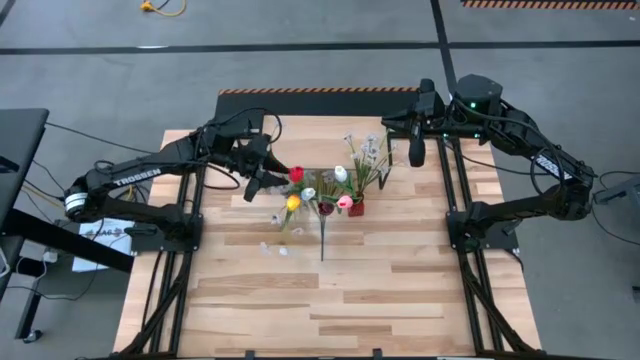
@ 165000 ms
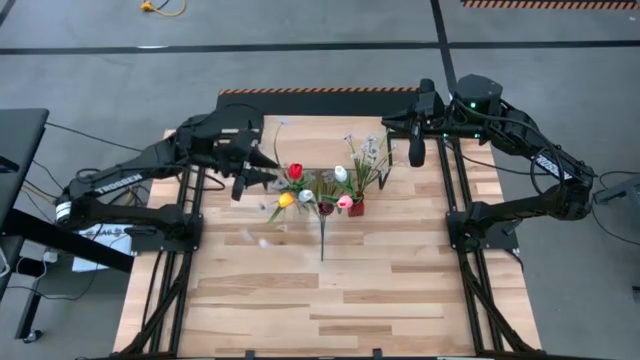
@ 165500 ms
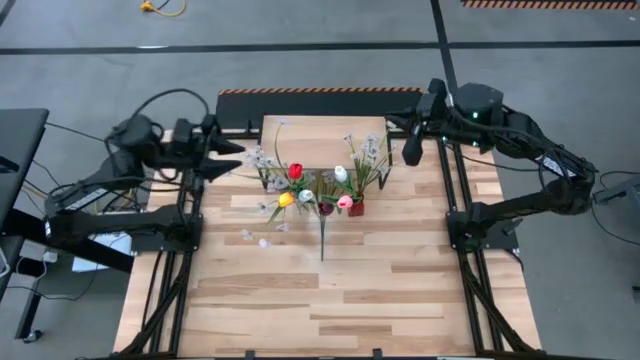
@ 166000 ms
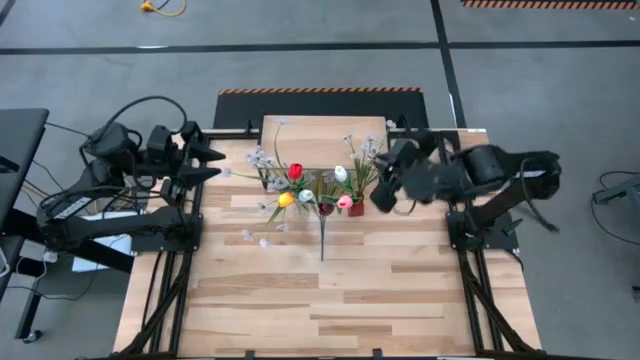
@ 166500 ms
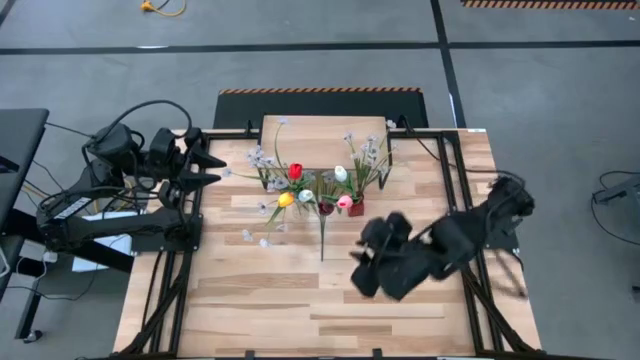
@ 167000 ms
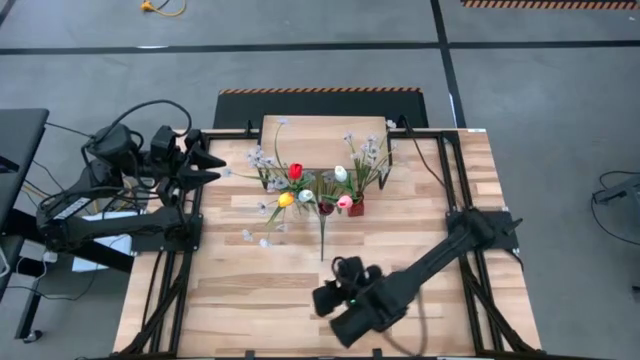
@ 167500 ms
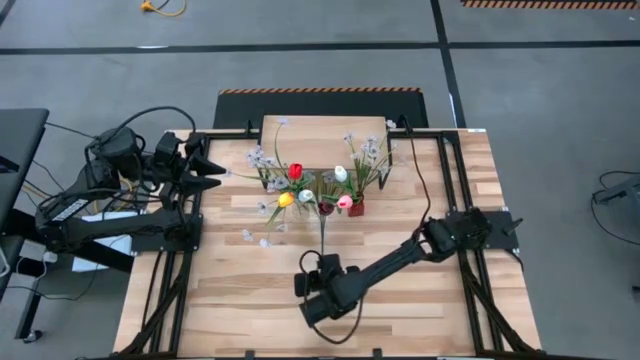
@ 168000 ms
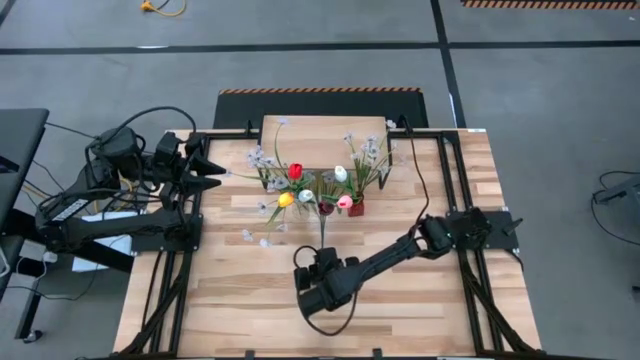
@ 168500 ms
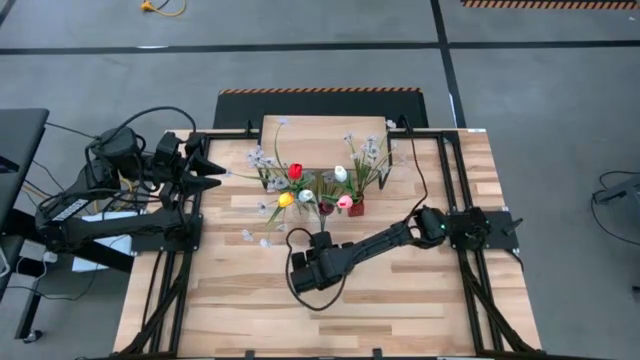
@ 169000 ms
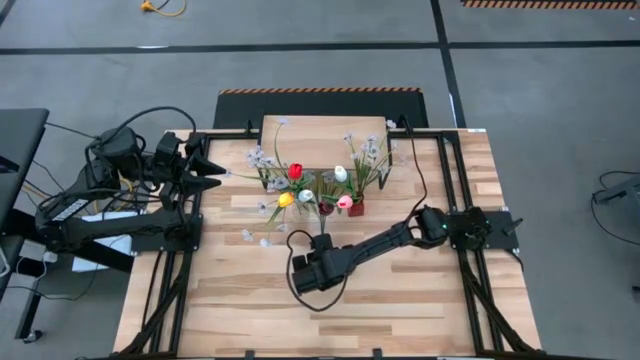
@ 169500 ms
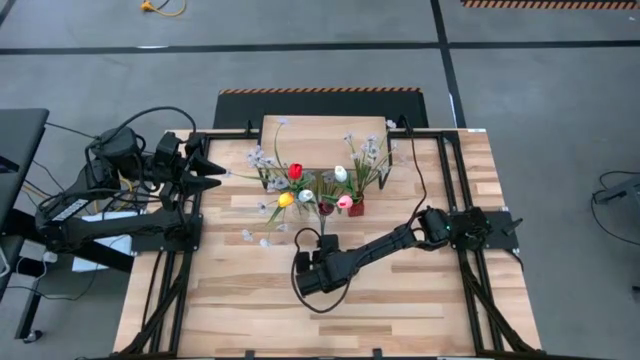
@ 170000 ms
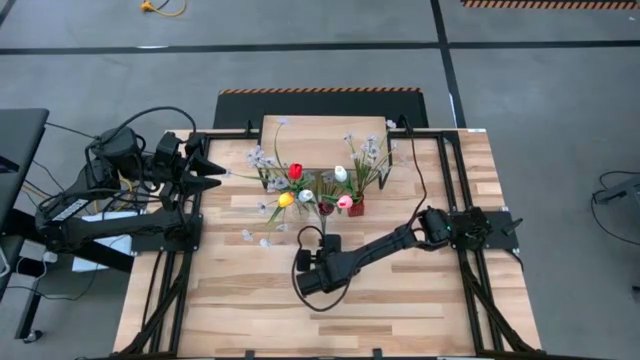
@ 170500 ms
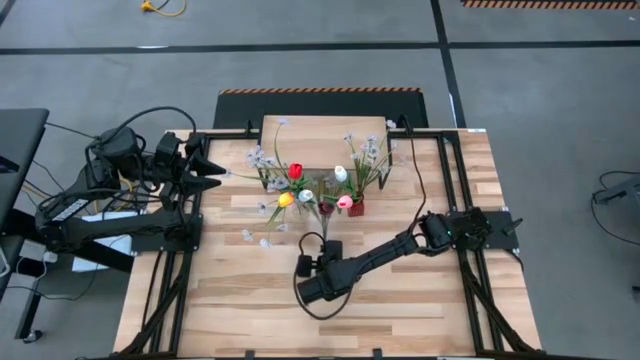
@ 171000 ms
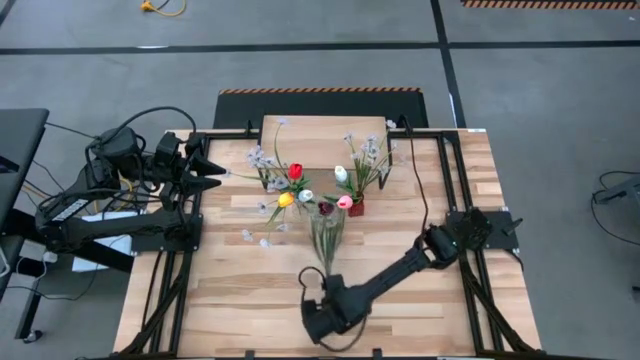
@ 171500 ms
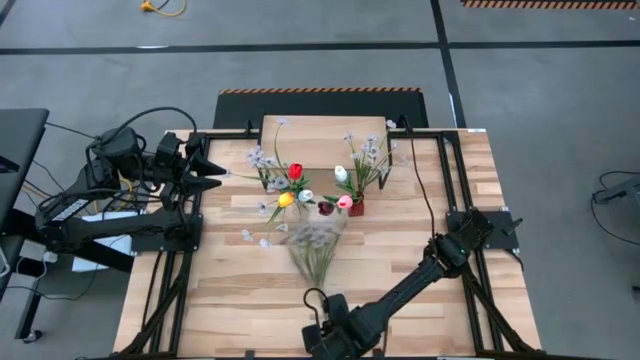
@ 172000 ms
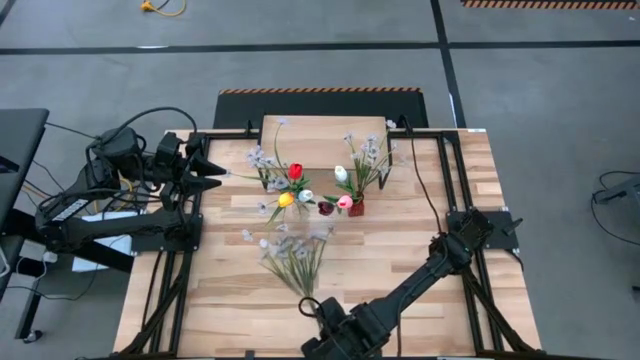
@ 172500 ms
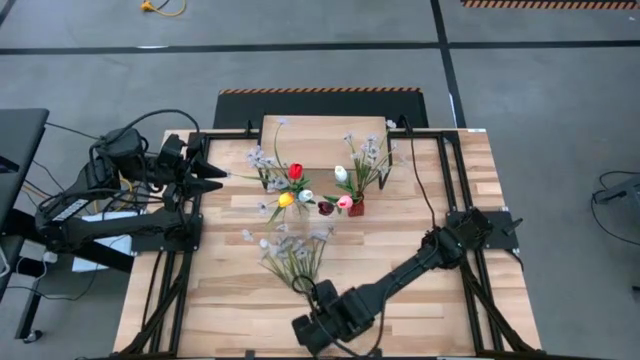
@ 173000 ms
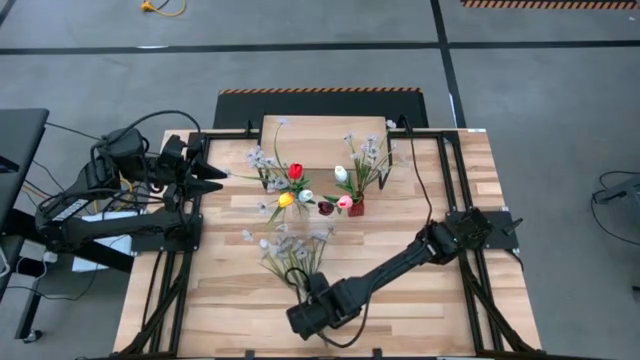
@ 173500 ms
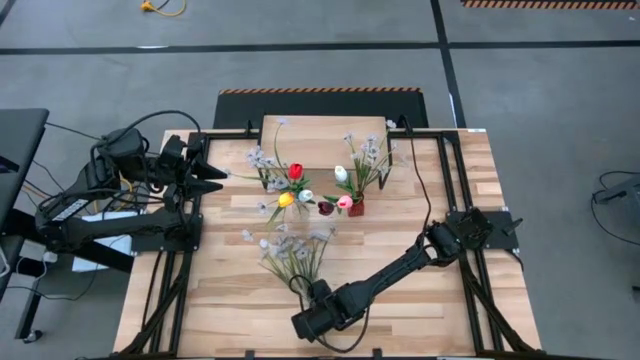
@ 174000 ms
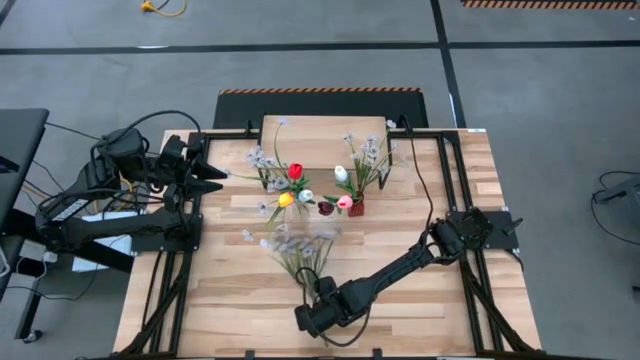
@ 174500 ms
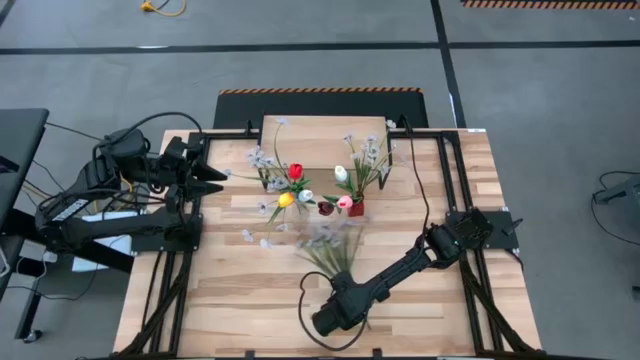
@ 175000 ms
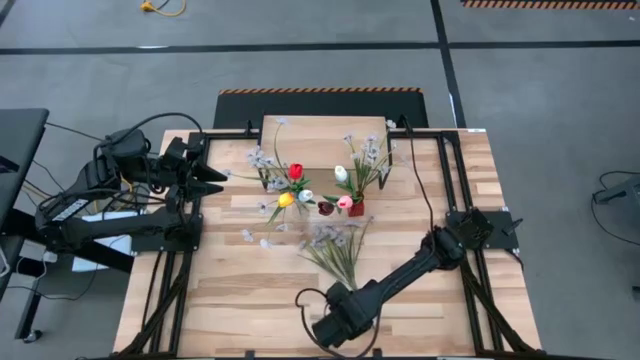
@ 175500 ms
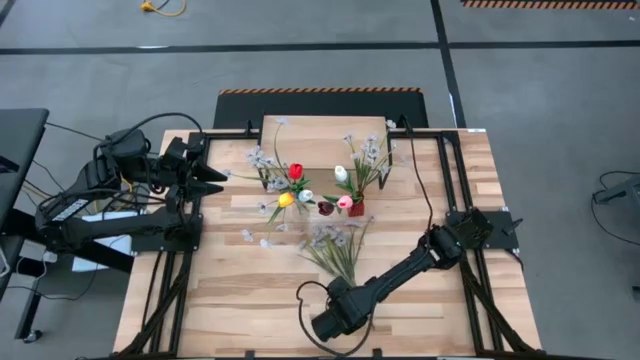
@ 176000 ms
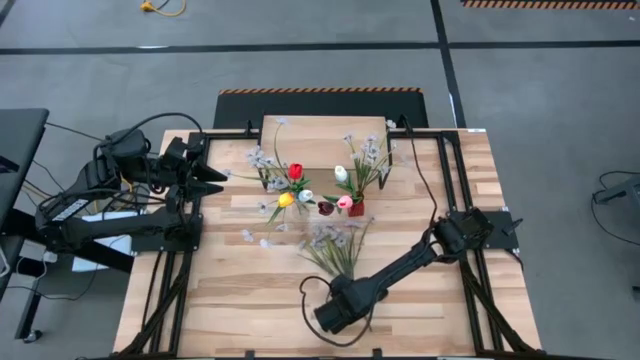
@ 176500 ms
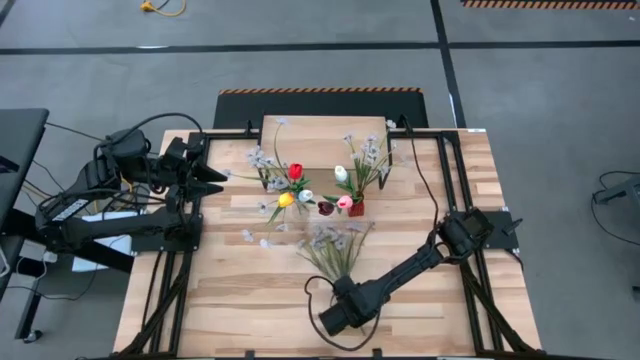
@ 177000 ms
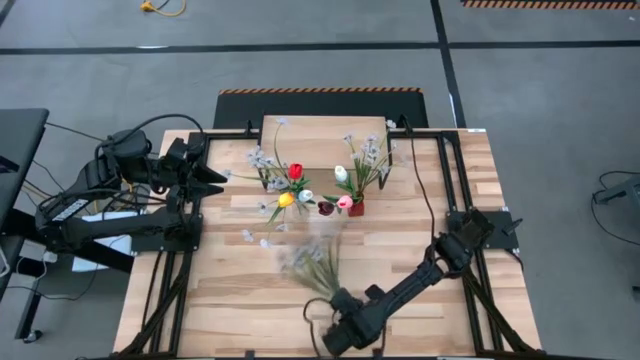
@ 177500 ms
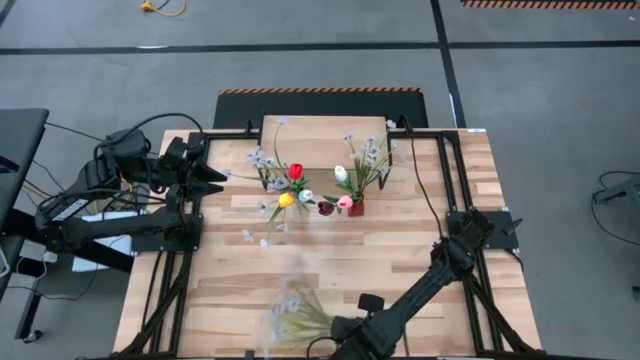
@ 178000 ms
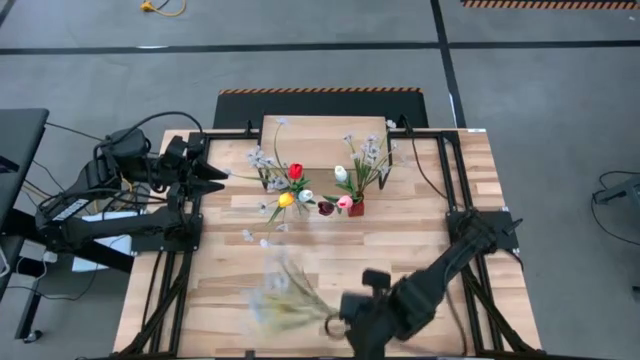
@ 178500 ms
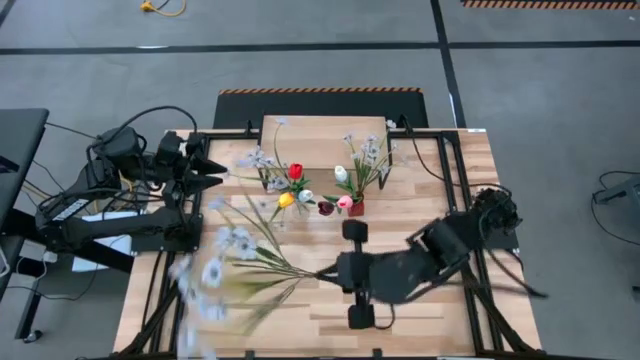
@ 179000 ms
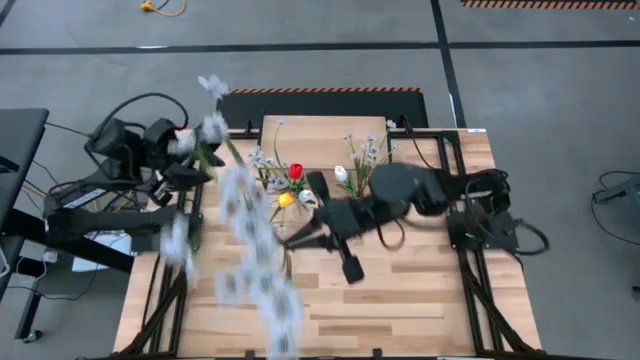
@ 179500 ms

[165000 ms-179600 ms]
Task: Pick and place flowers into a vace then onto a shelf
Put the white flower into the red vase

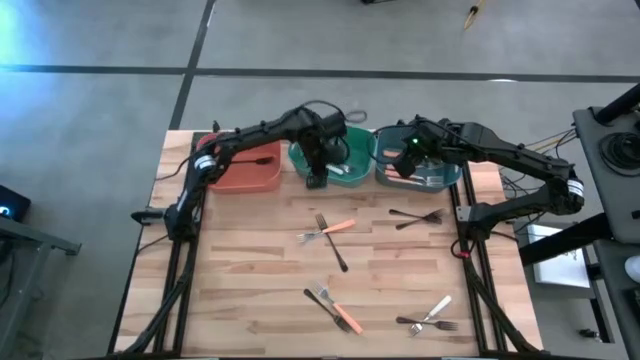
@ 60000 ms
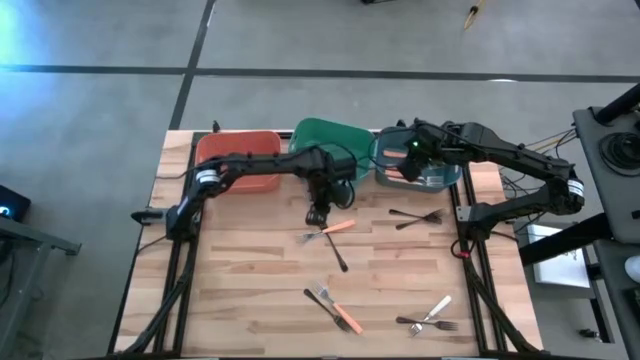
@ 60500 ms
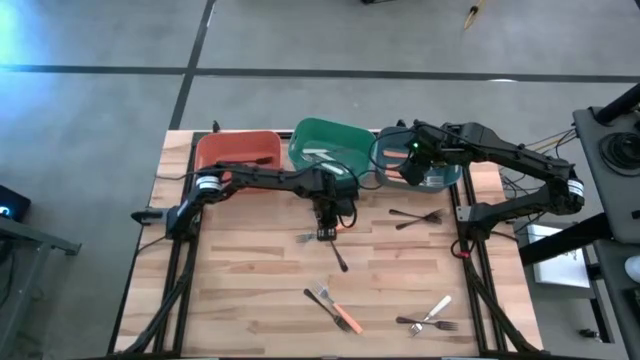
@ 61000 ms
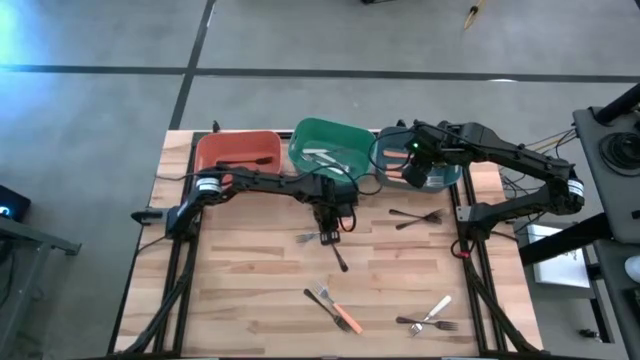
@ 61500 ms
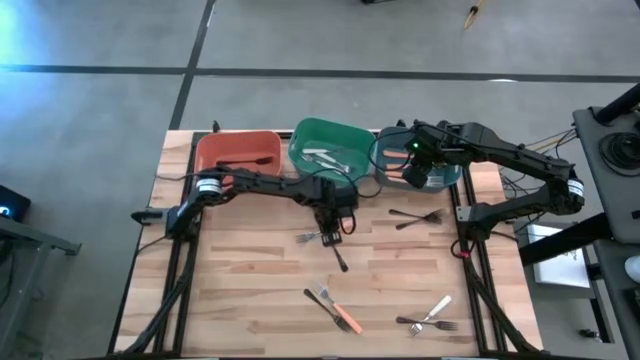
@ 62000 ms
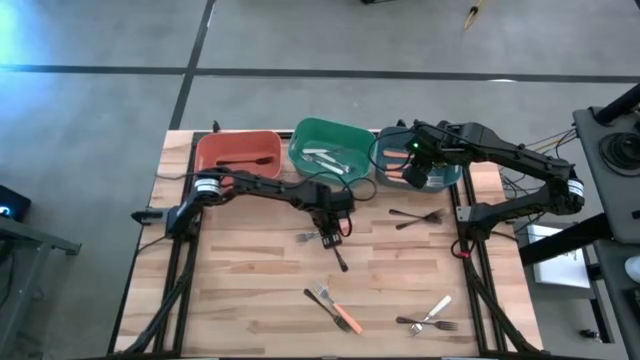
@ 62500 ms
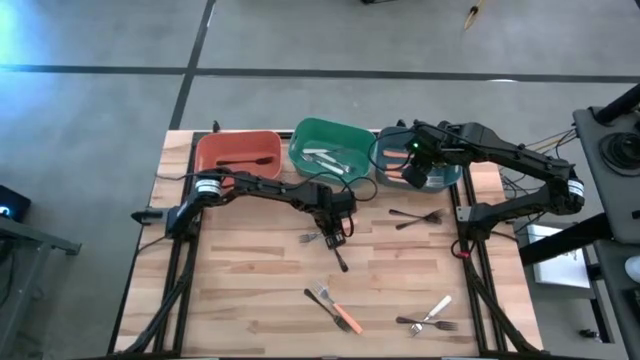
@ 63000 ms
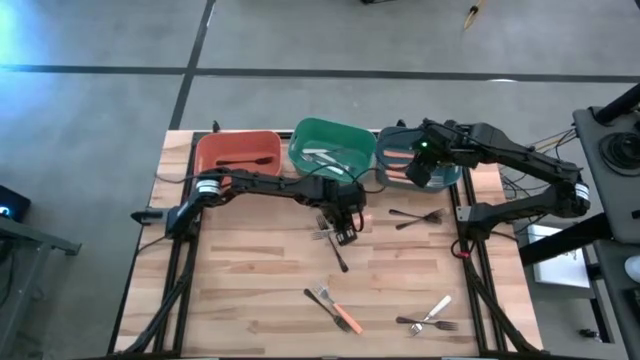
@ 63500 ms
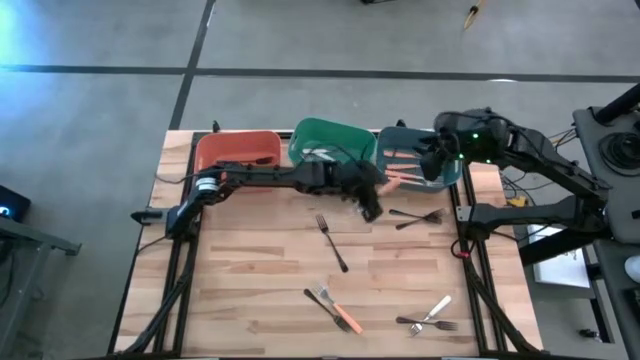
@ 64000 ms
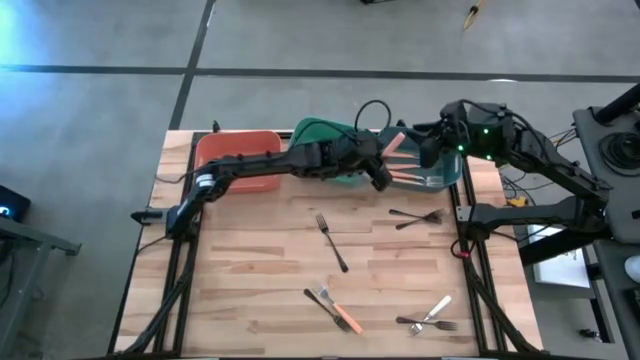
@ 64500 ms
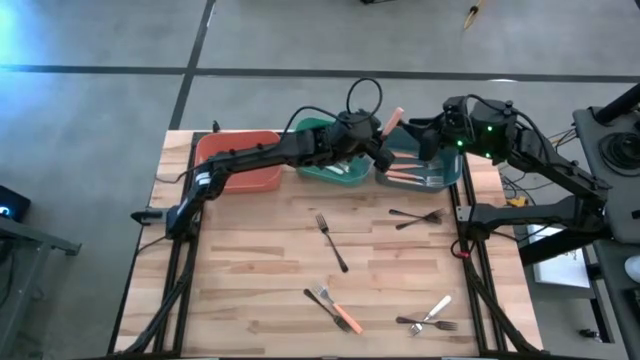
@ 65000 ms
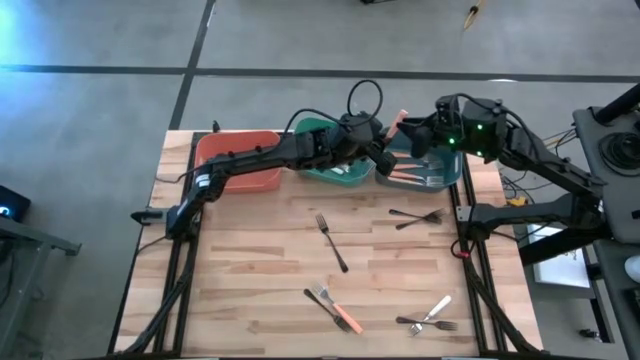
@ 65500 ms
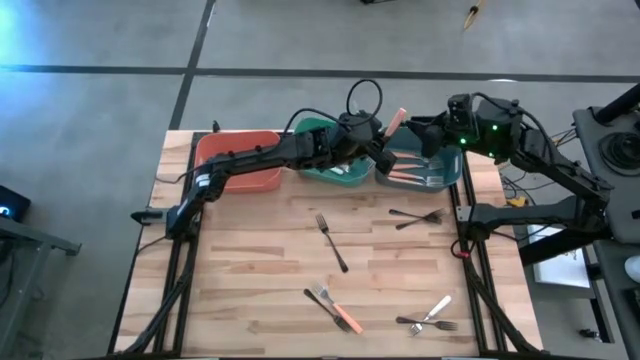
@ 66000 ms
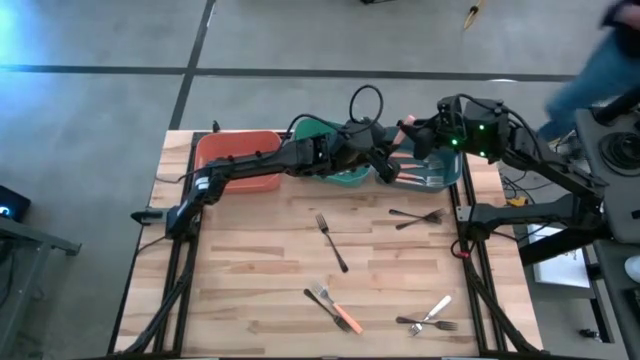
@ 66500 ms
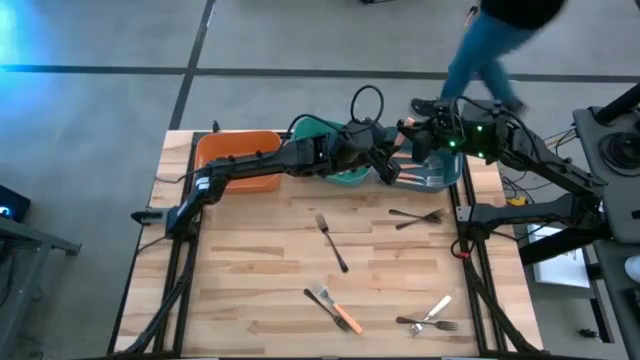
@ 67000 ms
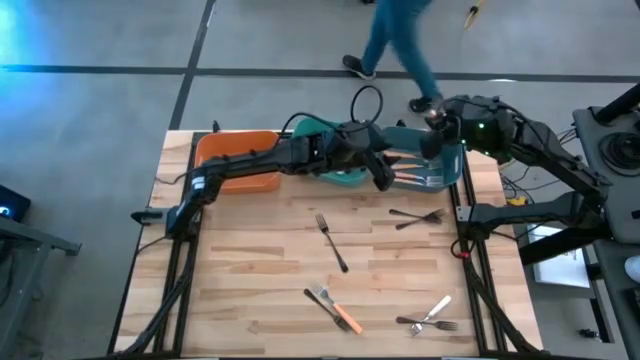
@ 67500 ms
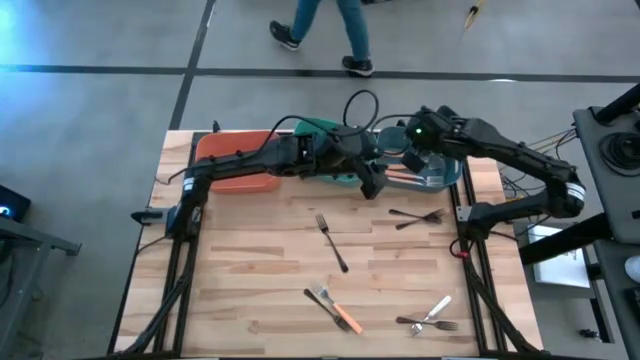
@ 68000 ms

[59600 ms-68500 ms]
Task: Sort silverware by color (type)
Put the light orange fork into the blue bin
